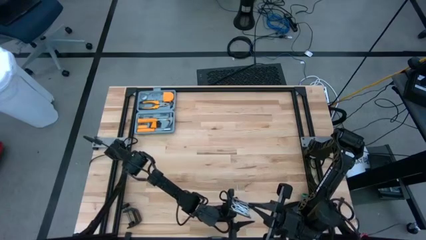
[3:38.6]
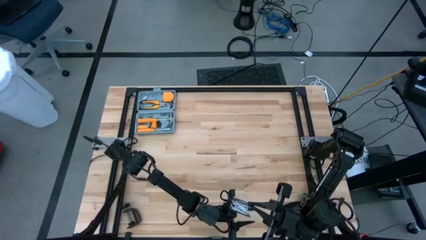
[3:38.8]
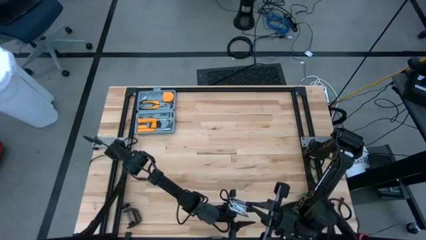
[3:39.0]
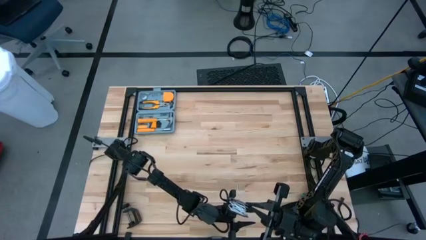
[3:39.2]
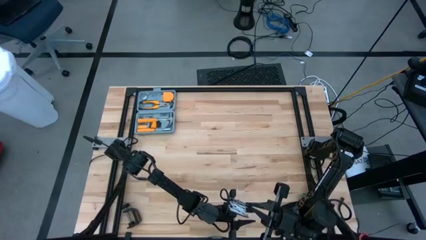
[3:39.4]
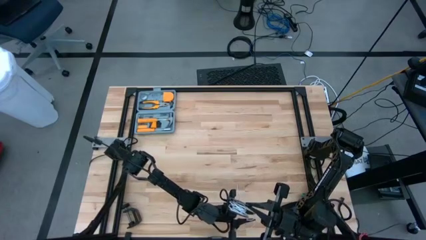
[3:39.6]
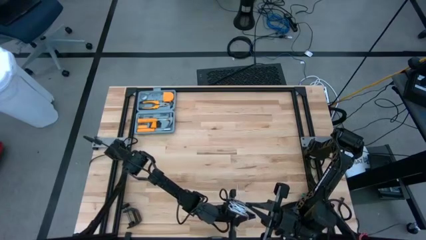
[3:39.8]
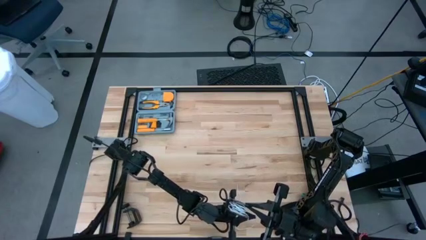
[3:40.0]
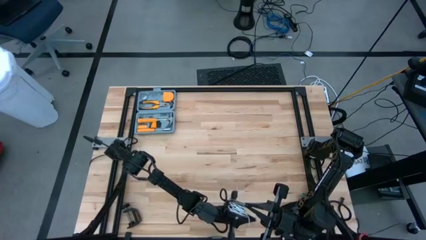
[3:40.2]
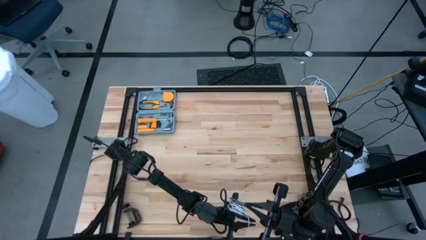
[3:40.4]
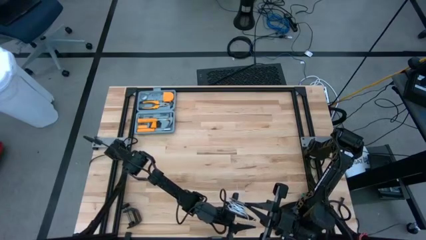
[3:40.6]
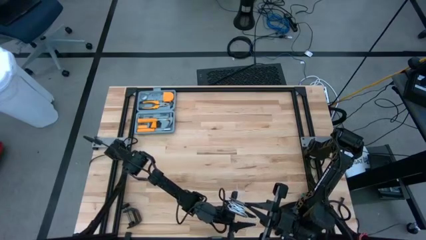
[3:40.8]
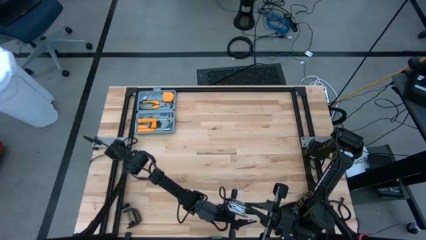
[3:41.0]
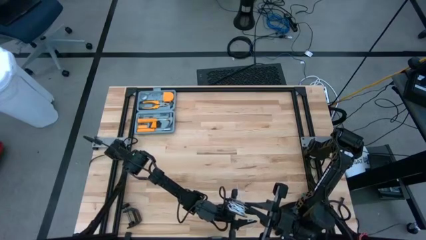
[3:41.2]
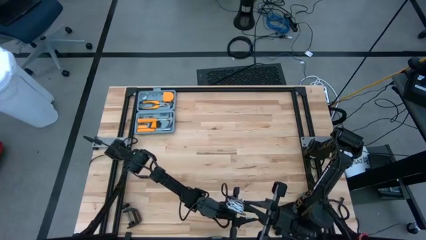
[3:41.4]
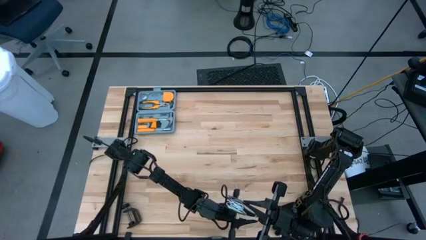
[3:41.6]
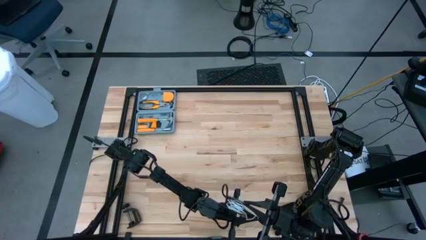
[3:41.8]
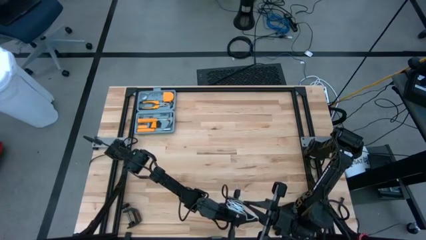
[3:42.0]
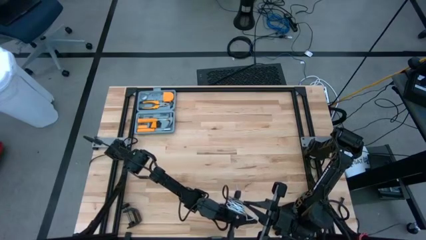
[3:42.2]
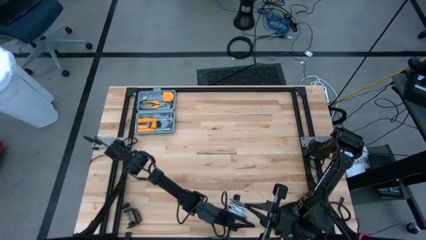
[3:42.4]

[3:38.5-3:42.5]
Task: Coil cords
Coil the white wire on the spool

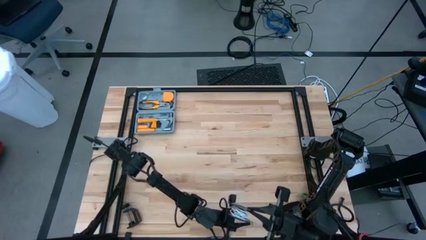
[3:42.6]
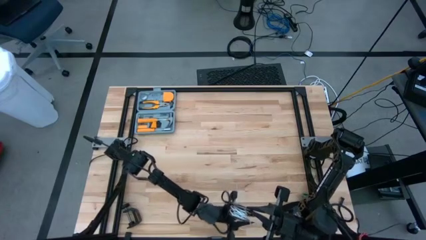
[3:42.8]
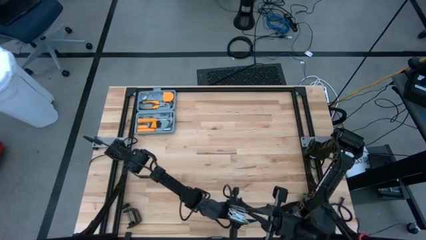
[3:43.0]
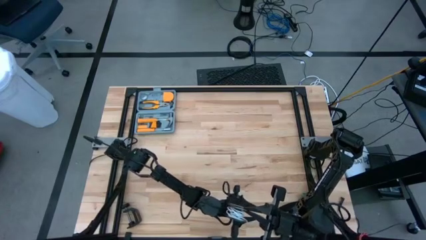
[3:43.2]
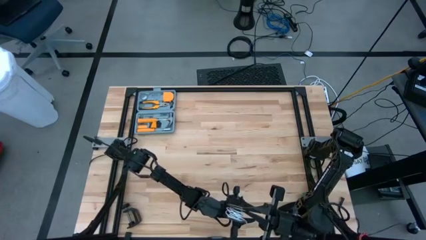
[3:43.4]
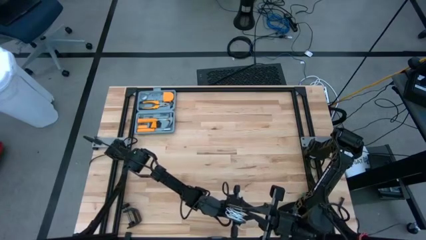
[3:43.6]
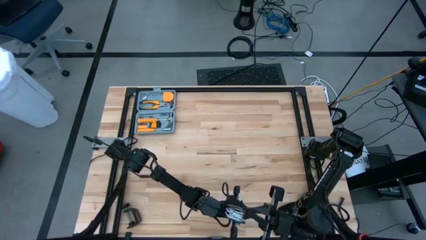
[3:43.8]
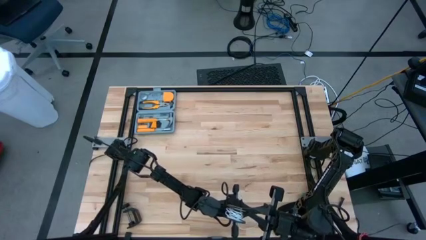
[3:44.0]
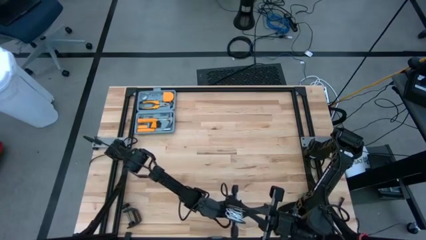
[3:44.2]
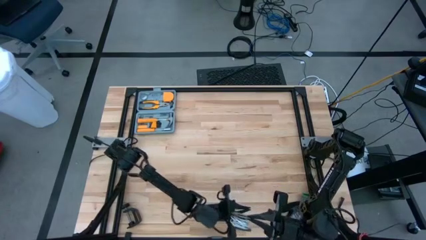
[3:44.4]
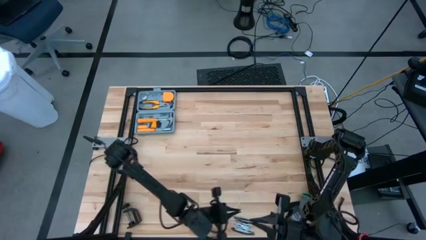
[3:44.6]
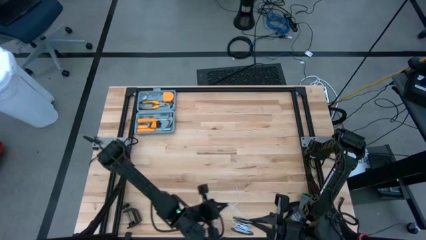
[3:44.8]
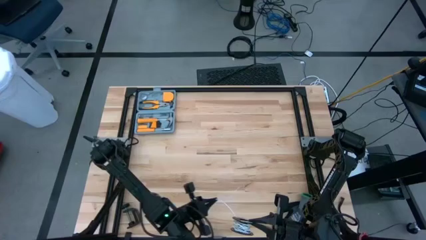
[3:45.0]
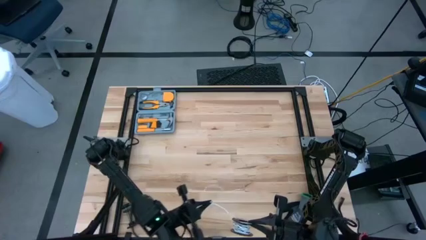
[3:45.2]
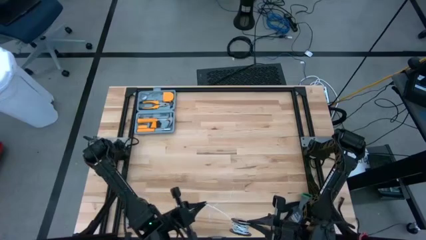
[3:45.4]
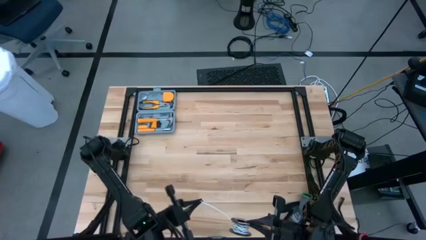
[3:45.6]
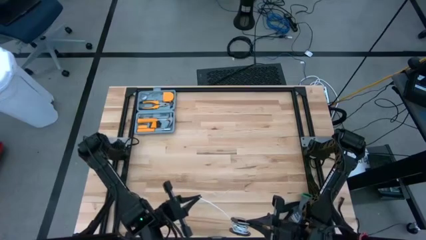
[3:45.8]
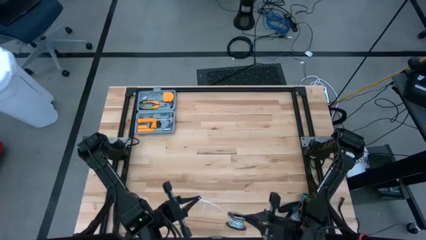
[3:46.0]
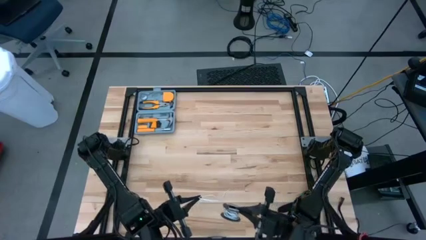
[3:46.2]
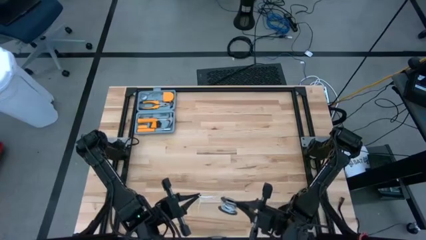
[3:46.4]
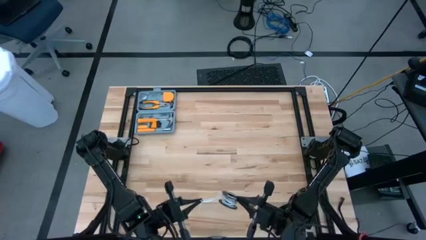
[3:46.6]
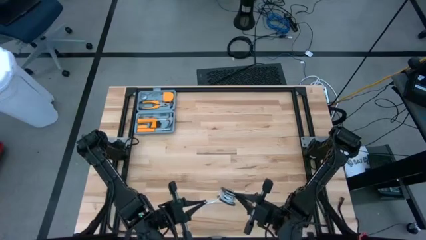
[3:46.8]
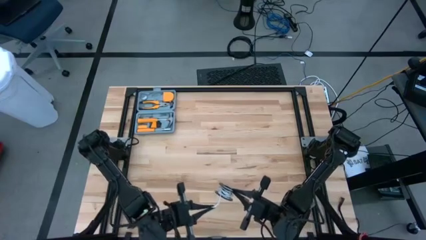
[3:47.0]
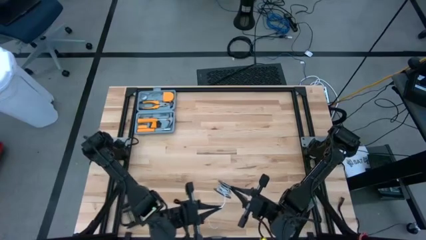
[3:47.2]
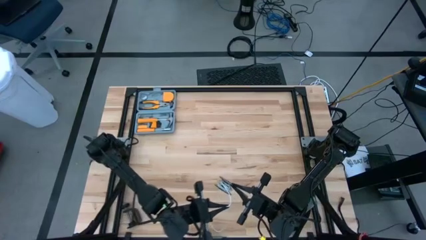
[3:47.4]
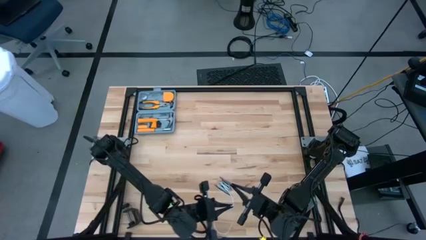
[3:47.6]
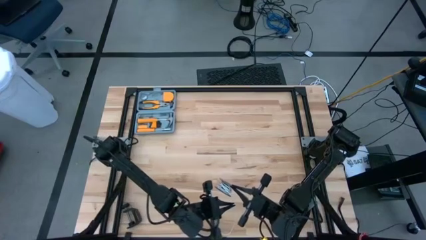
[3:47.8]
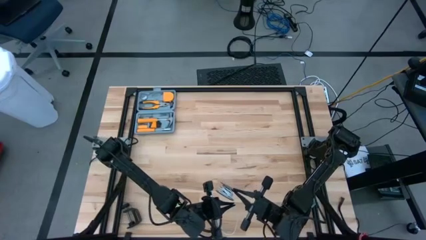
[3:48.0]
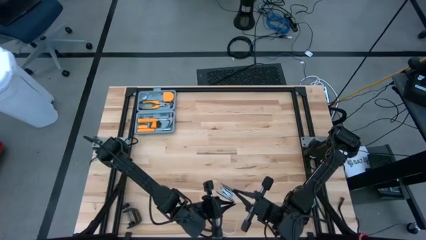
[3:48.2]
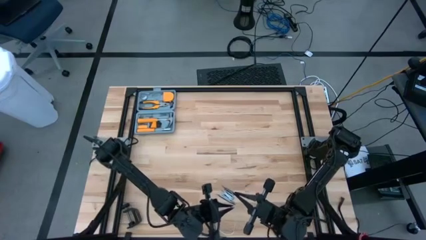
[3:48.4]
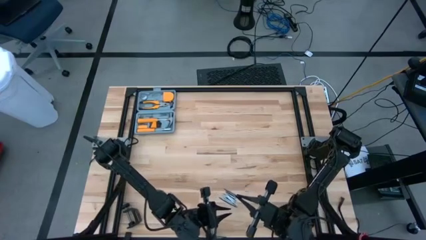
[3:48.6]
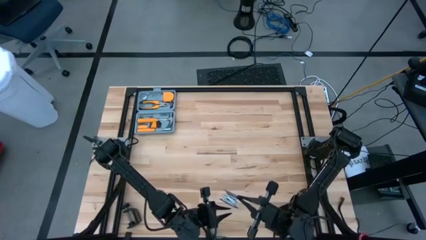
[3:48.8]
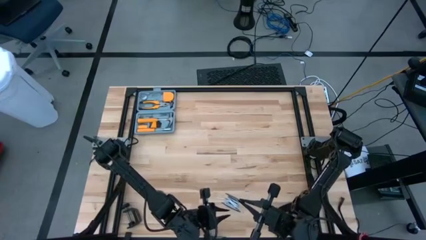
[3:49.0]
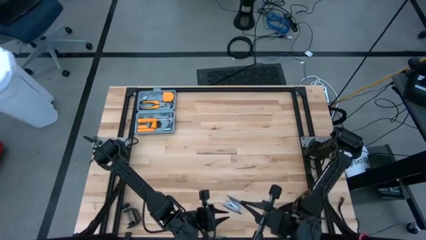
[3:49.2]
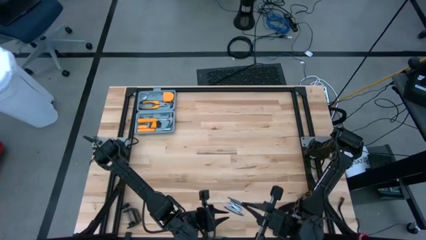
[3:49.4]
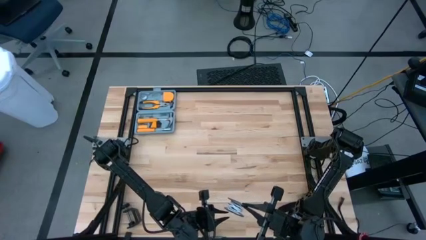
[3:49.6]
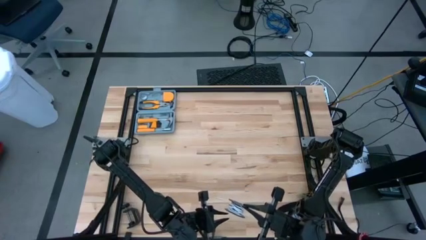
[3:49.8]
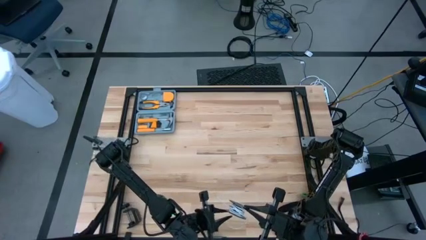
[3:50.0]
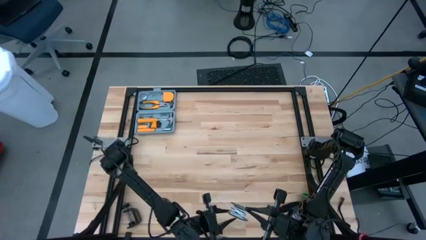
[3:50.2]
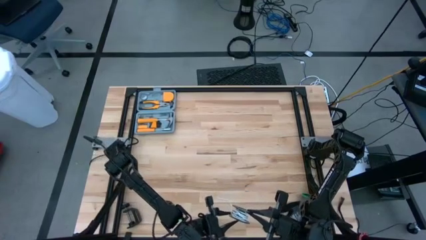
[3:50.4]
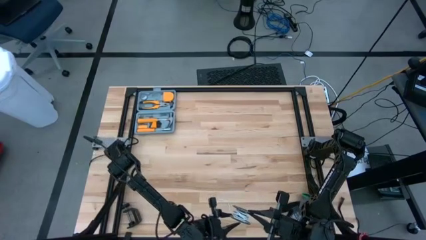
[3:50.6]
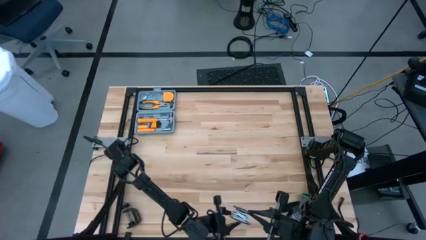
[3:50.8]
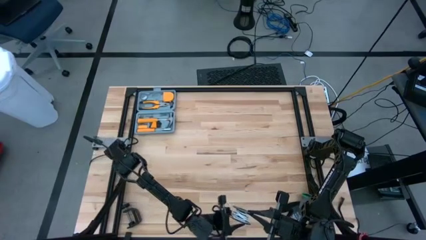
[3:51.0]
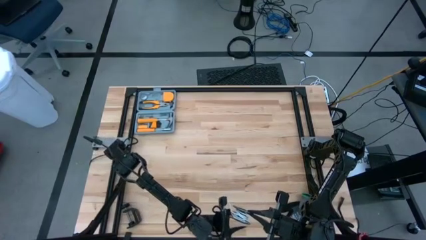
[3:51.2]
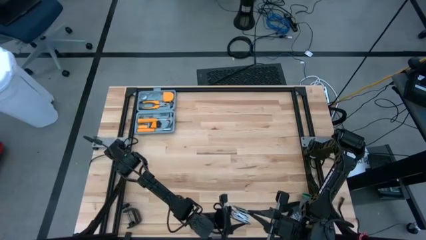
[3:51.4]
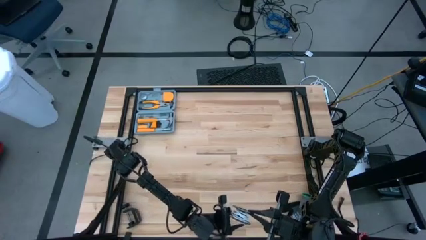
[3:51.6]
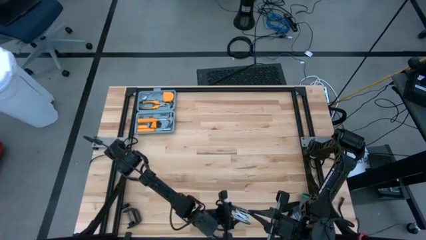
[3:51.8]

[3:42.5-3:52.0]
Coil the white wire on the spool

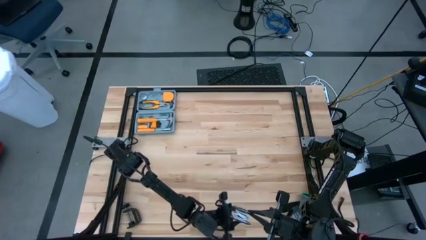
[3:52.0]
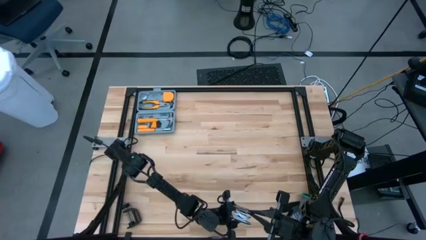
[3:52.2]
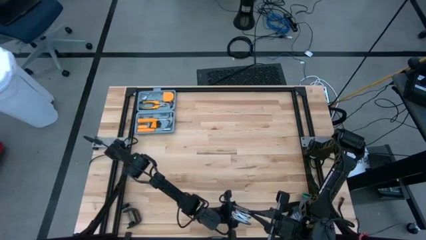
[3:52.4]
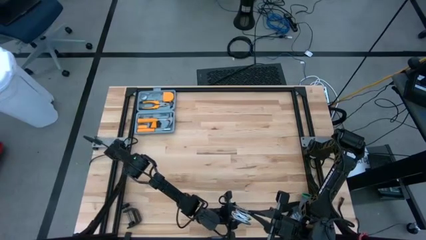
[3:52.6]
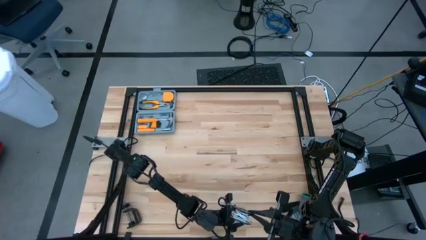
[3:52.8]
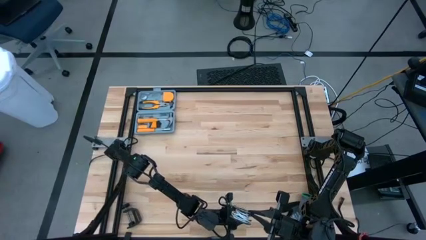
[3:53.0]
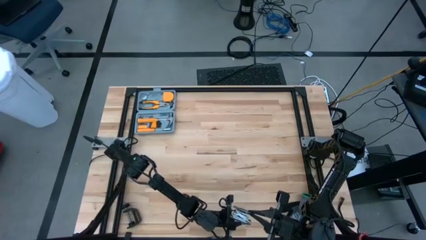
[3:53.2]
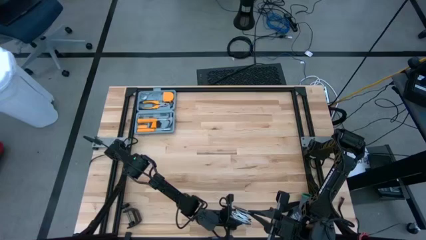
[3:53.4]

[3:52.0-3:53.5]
Coil the white wire on the spool

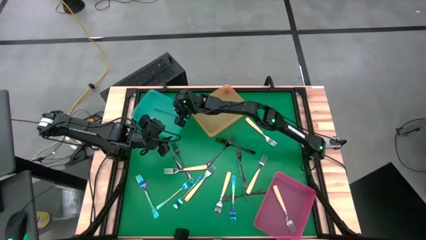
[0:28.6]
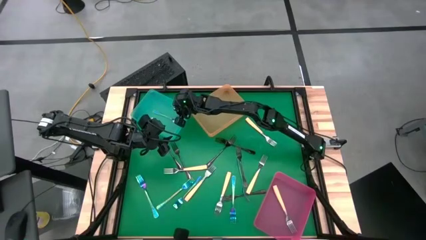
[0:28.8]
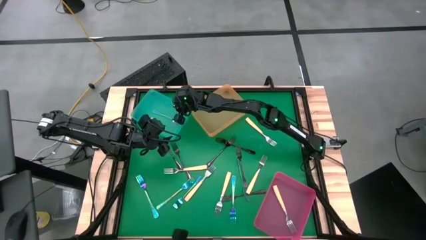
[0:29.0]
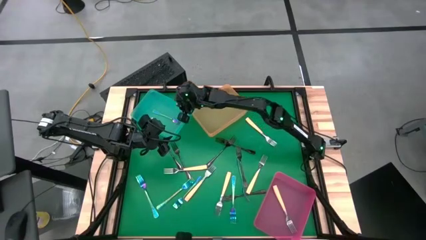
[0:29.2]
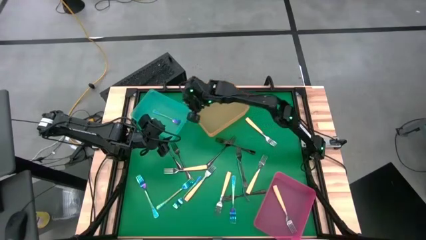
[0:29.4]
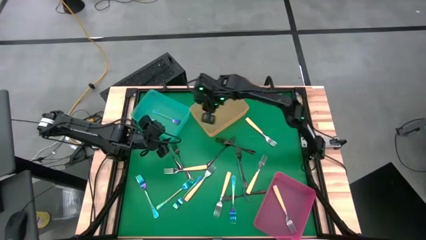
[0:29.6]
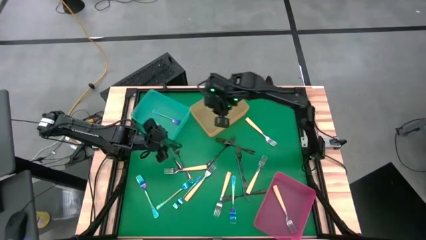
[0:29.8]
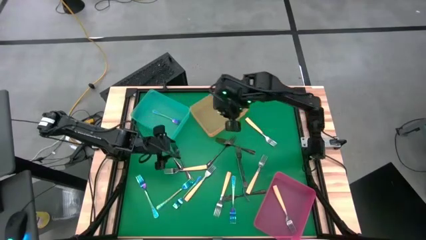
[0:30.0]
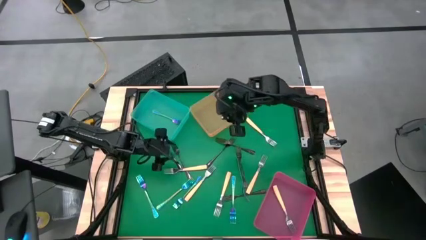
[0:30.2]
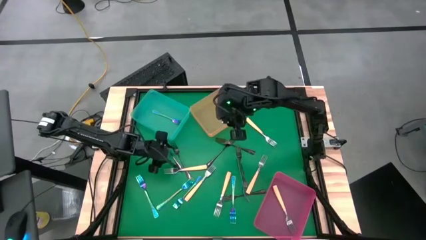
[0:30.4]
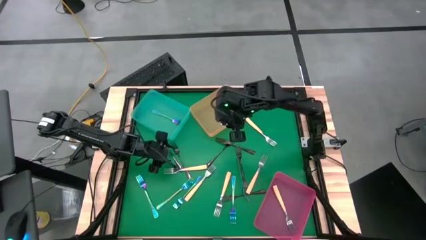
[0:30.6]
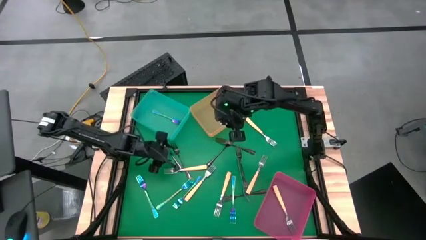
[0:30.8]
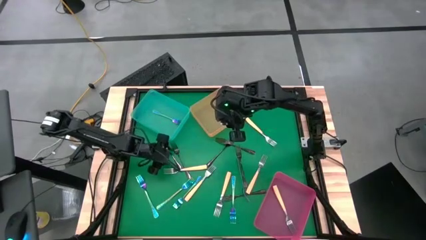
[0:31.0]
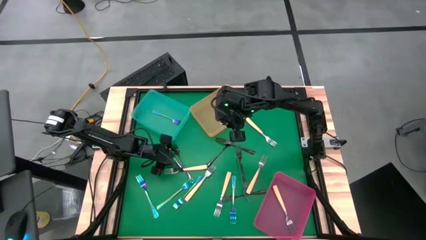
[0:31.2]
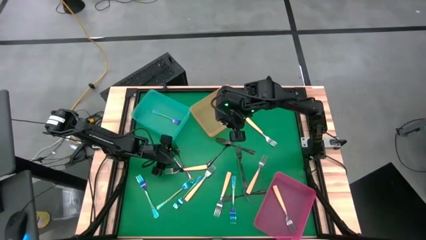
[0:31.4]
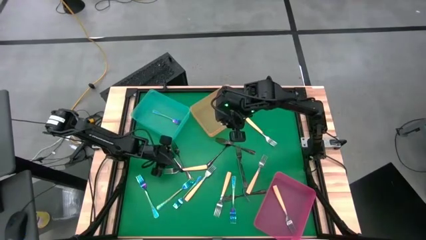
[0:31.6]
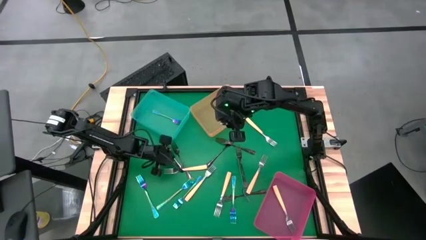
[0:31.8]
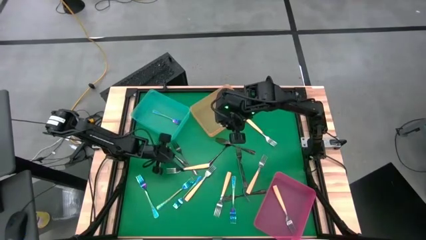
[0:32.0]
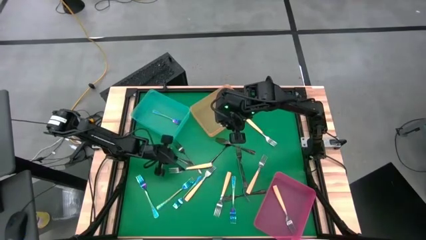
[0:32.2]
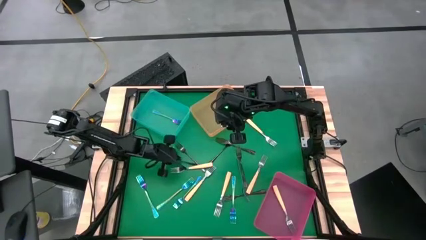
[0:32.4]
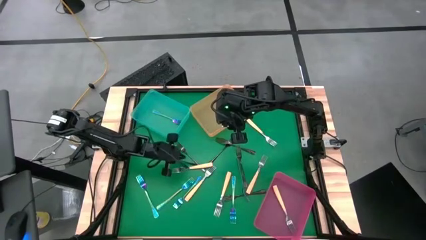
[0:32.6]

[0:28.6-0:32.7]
Task: Sort silverware by color (type)
Put the black fork into the yellow bin
